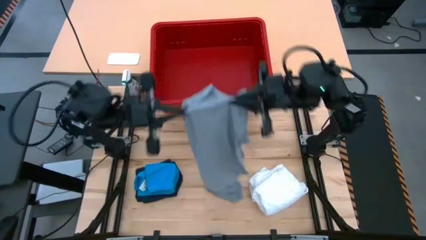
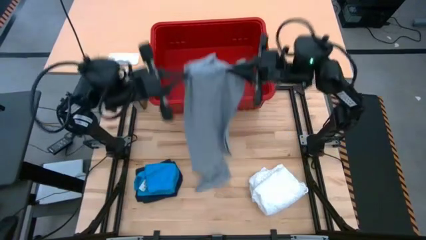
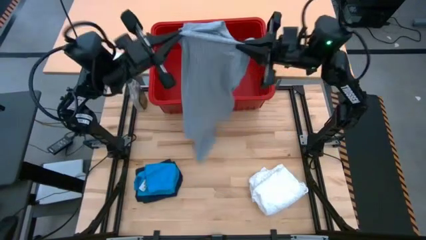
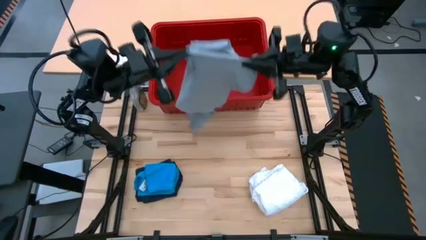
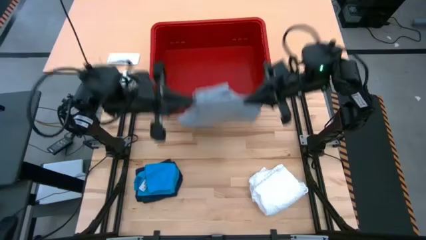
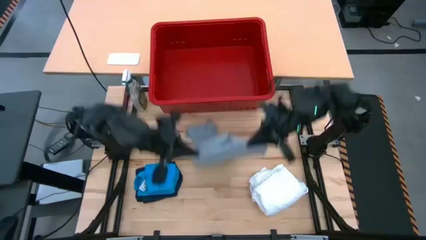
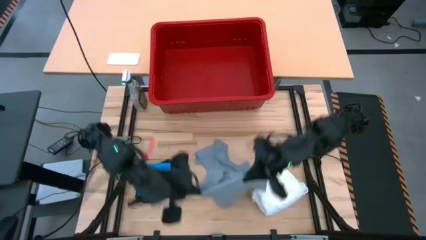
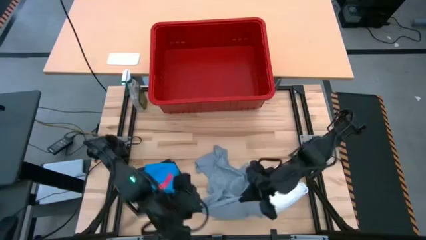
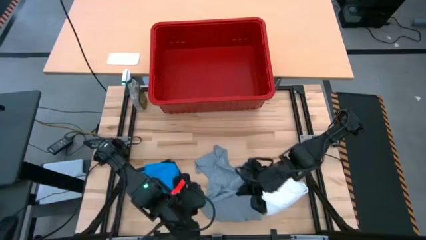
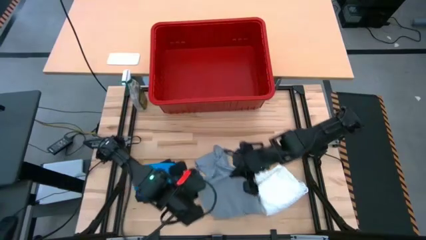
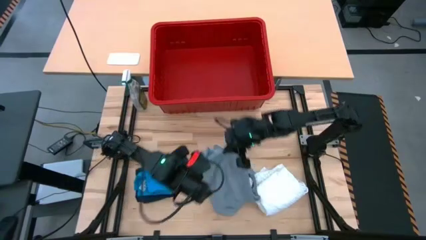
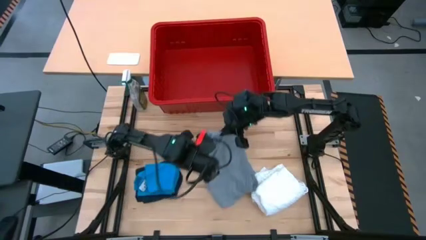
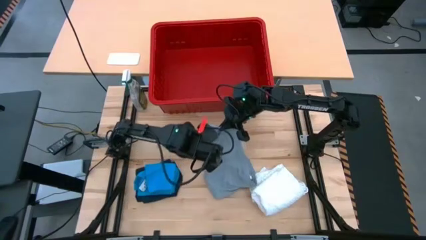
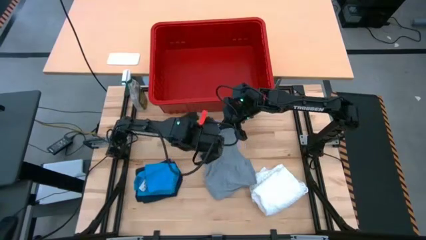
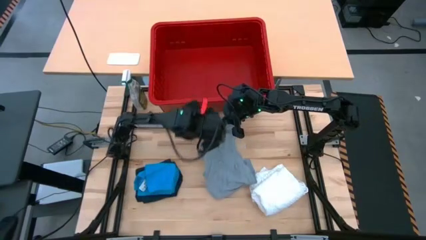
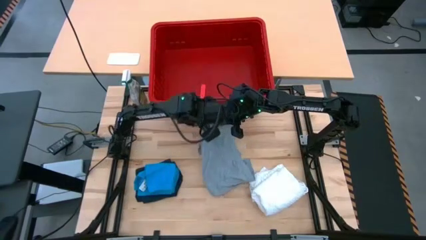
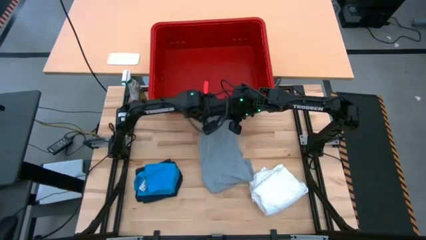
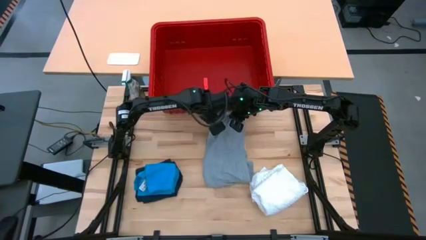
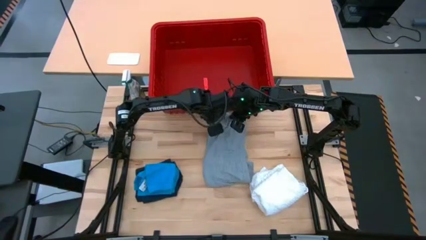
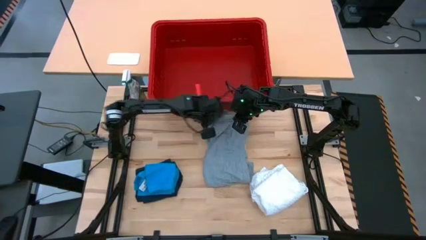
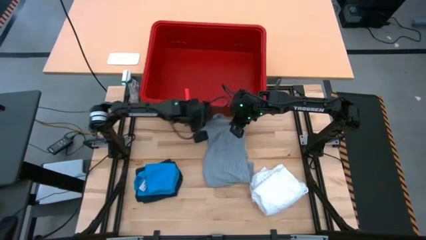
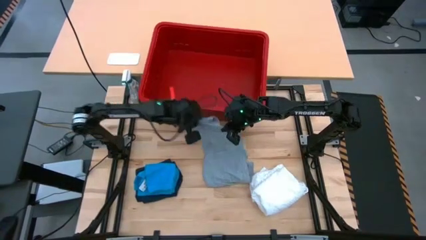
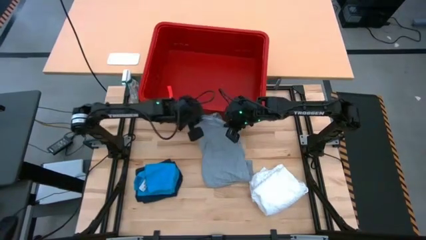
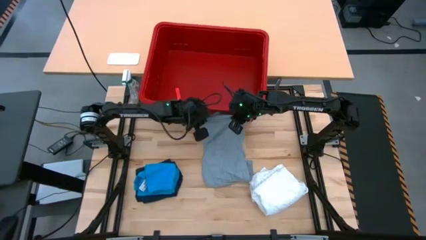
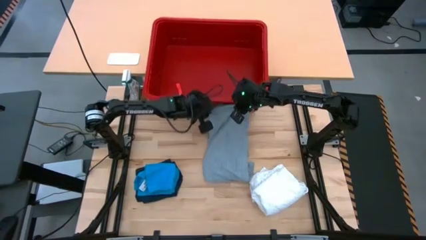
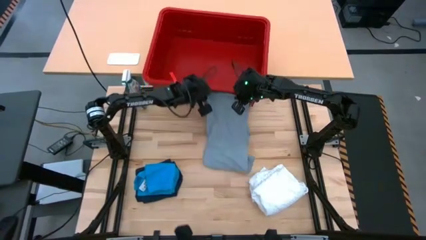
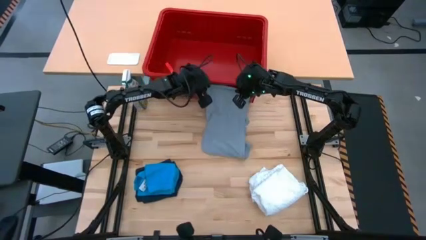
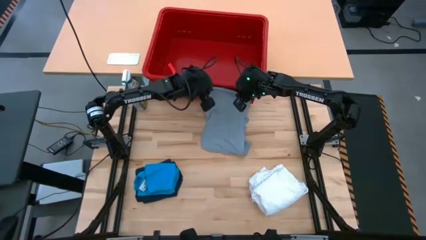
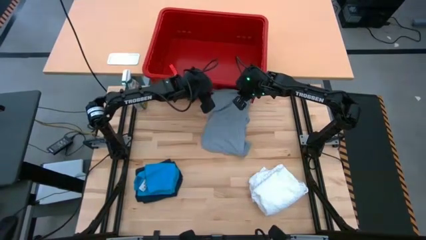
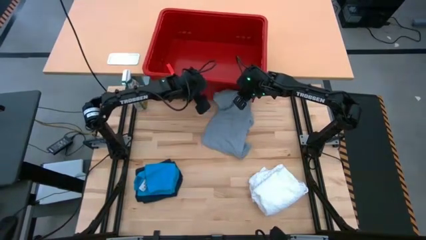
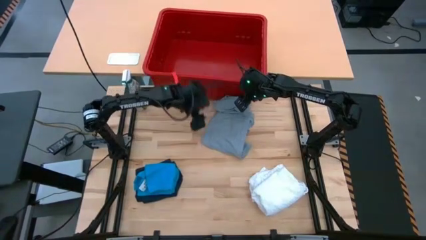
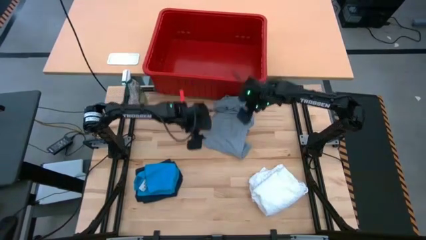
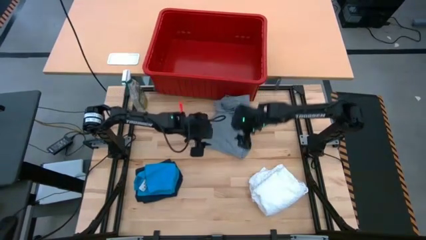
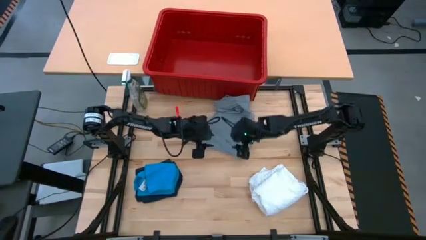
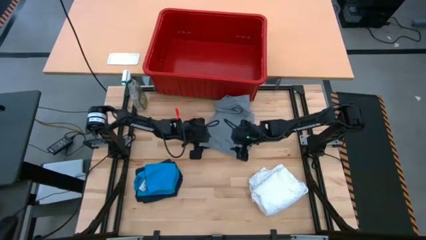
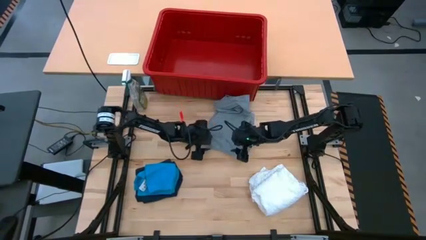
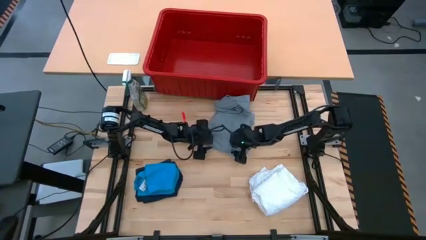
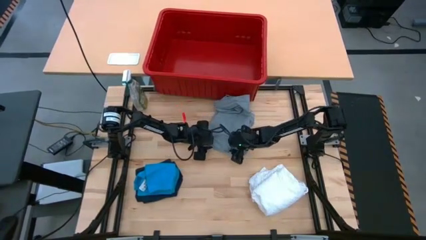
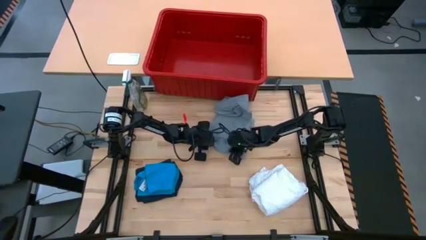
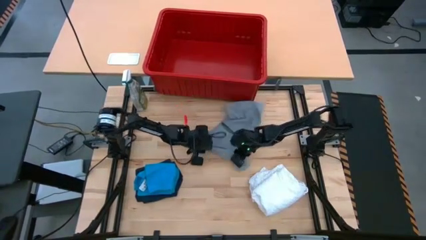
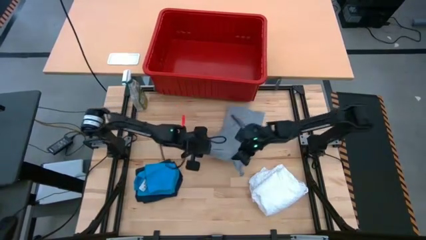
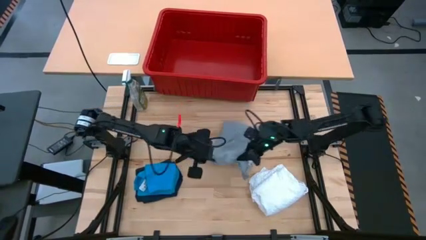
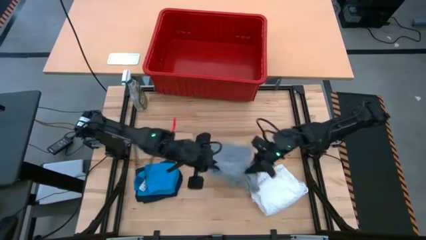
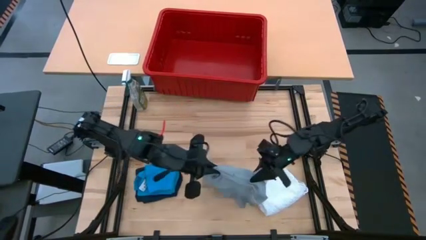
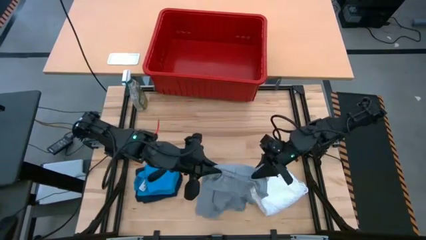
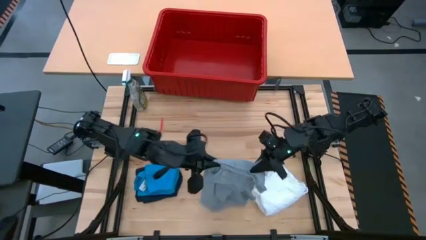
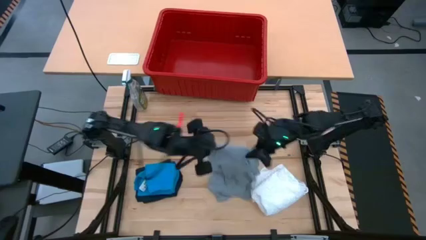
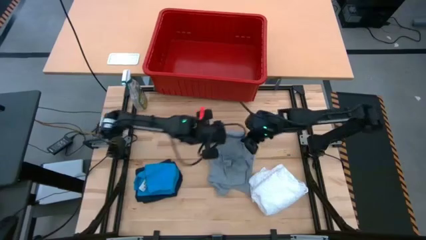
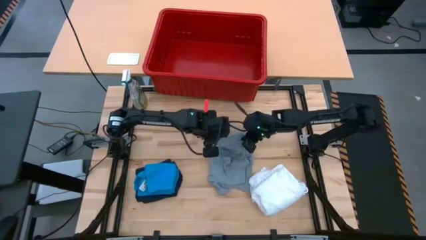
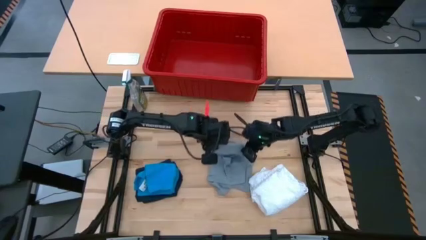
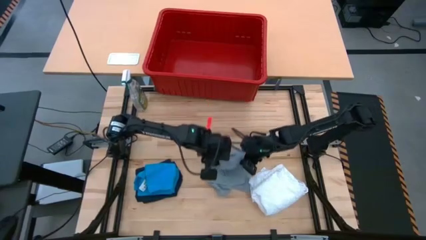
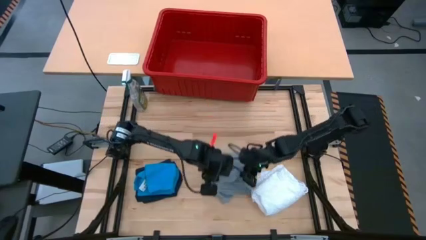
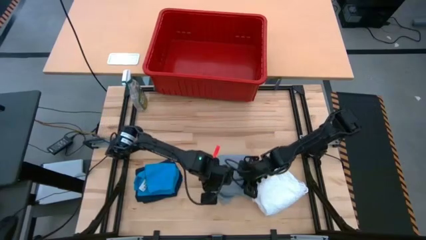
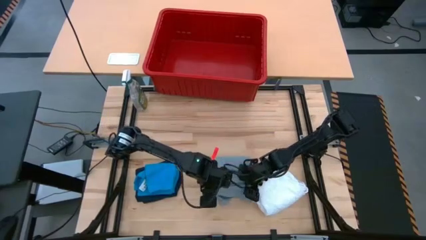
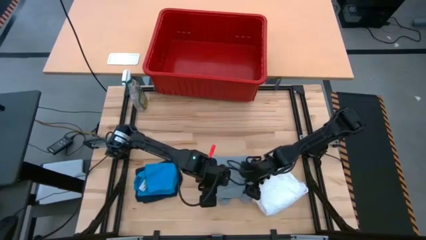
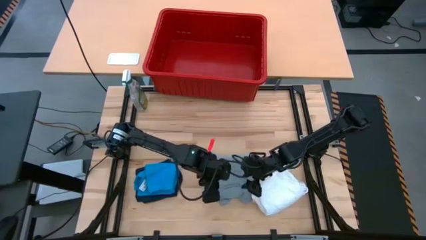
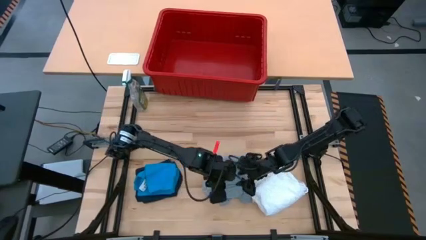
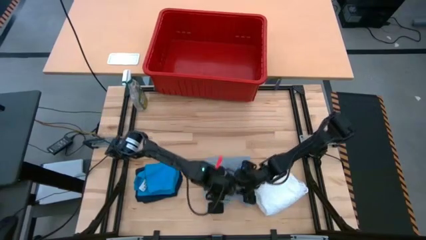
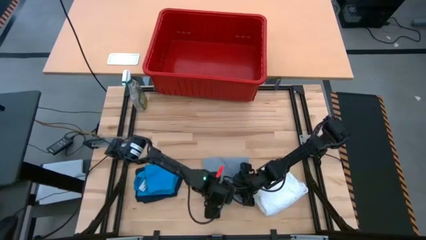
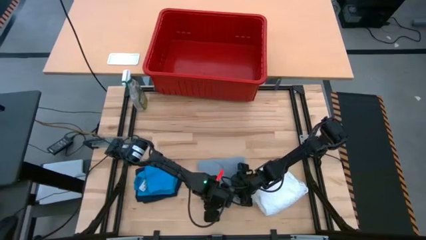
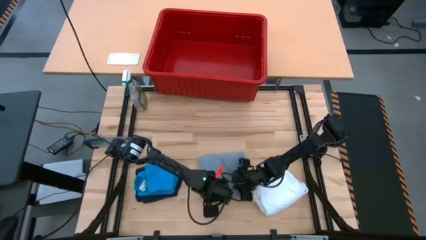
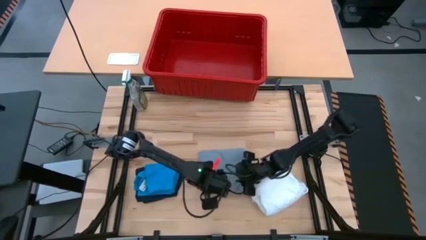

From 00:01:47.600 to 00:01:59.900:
Task: Fold laundry
Fold the gray shirt

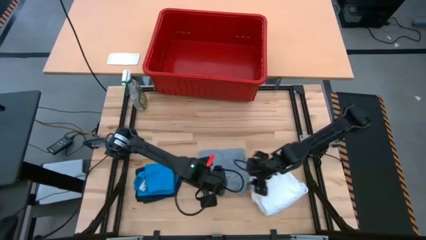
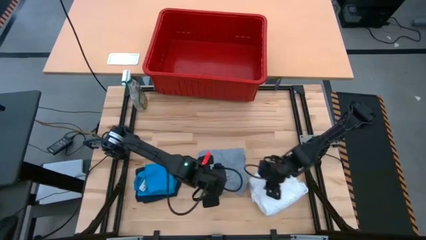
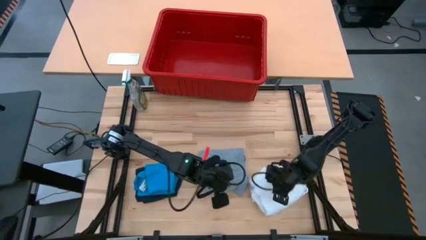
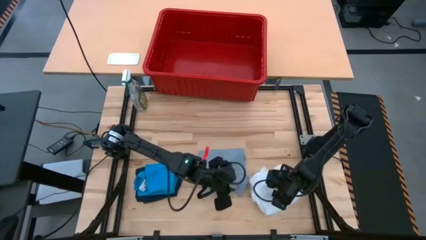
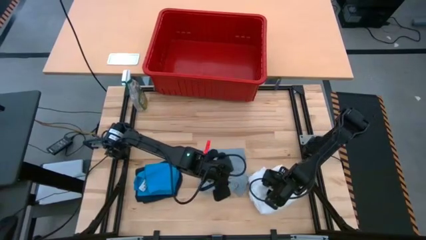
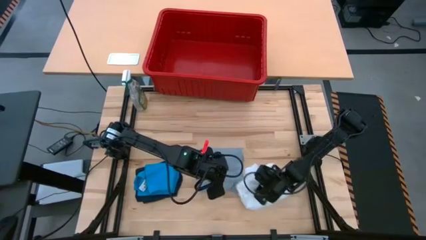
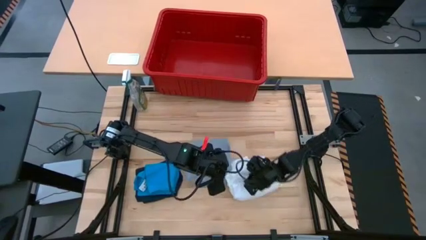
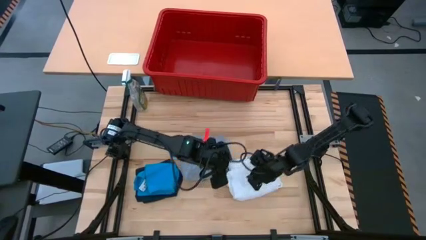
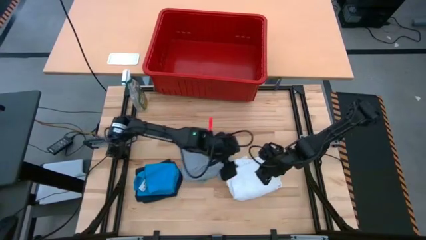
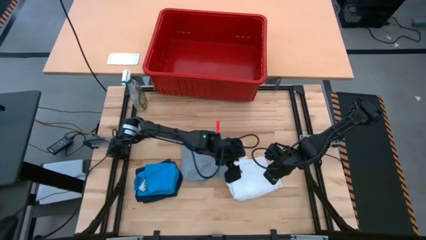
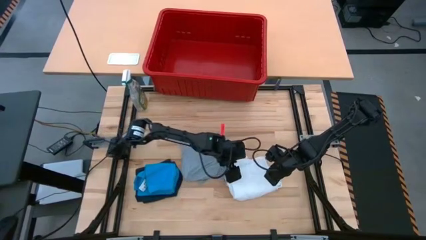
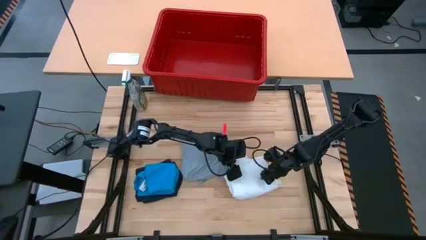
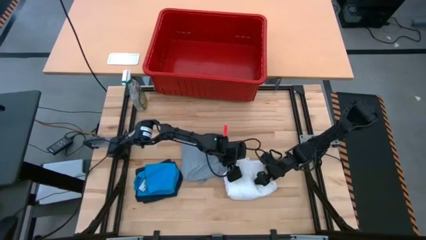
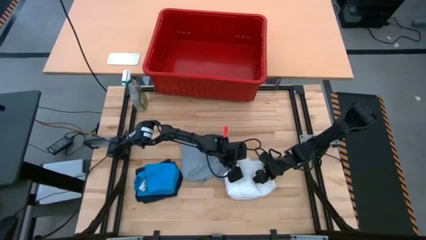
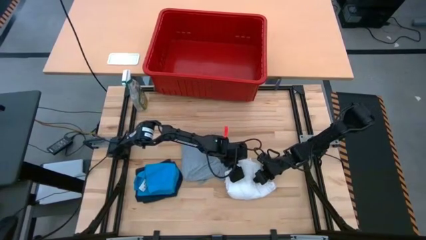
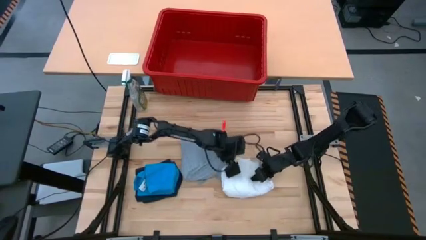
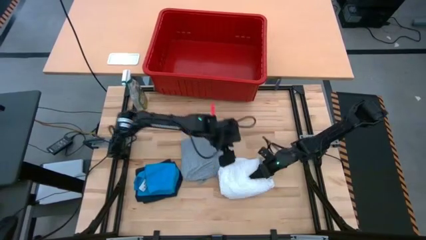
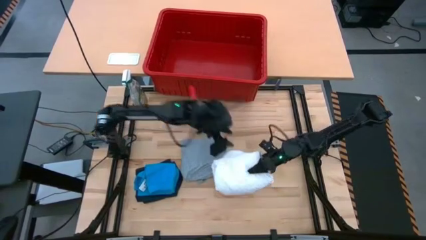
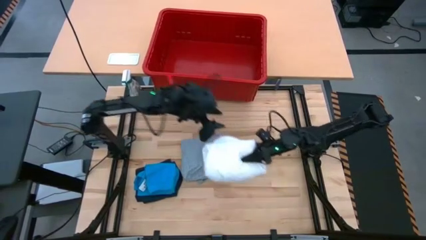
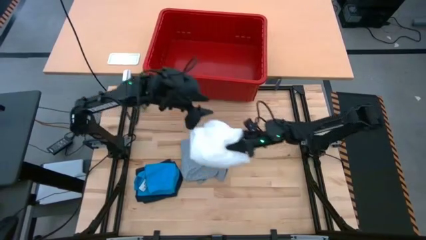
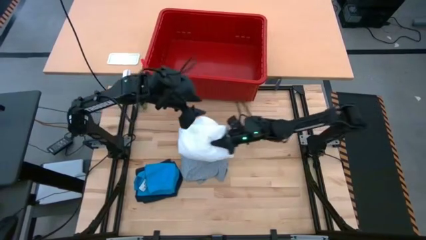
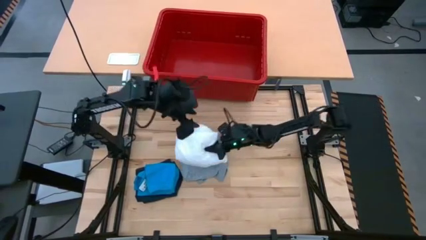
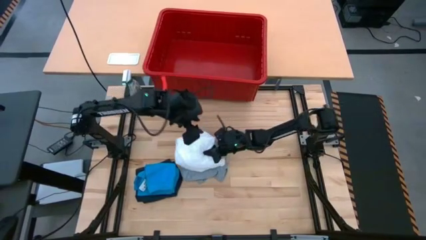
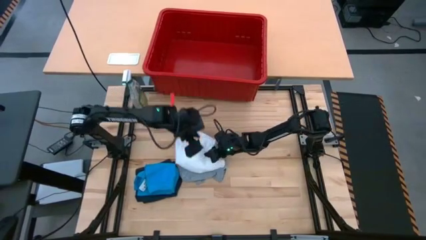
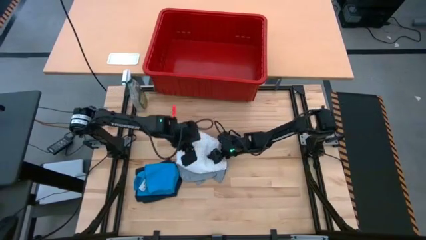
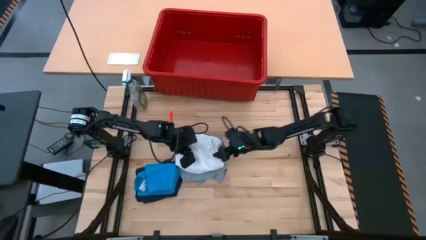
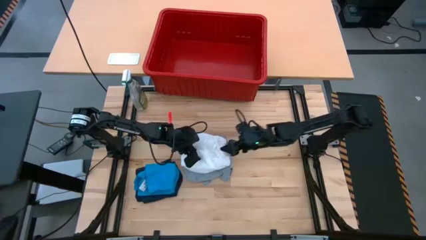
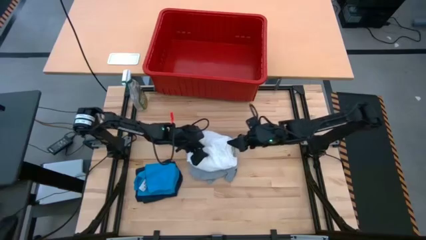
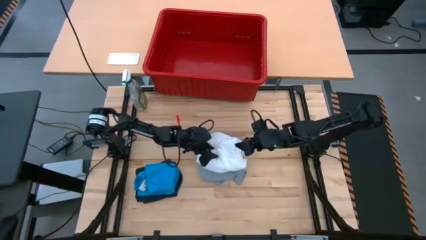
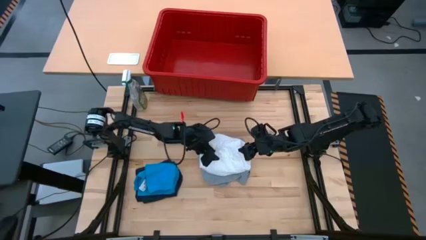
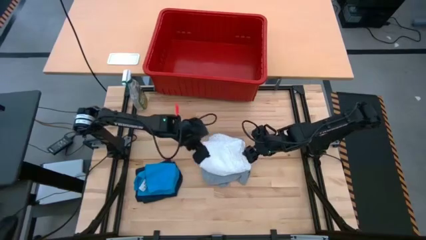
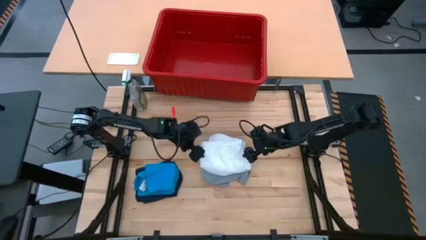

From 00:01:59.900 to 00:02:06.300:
Stack the white shirt on top of the gray shirt
